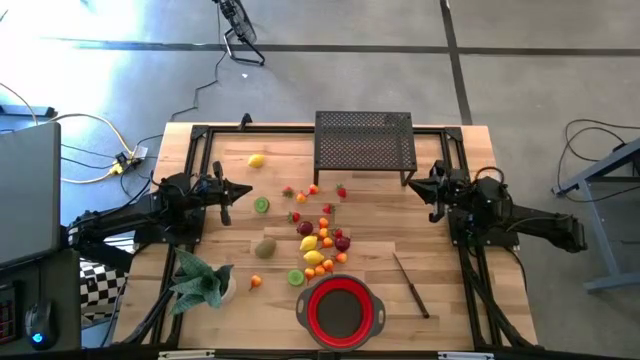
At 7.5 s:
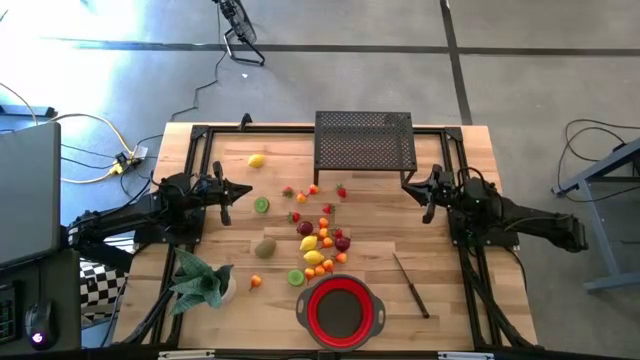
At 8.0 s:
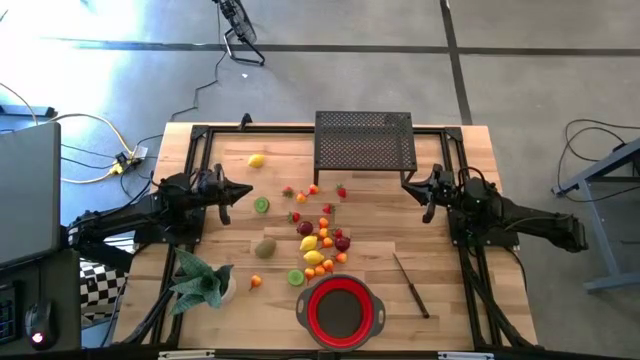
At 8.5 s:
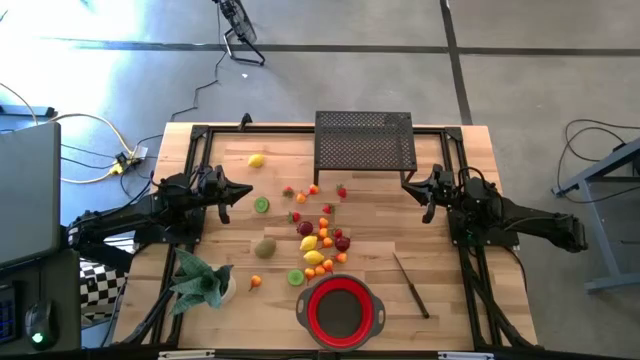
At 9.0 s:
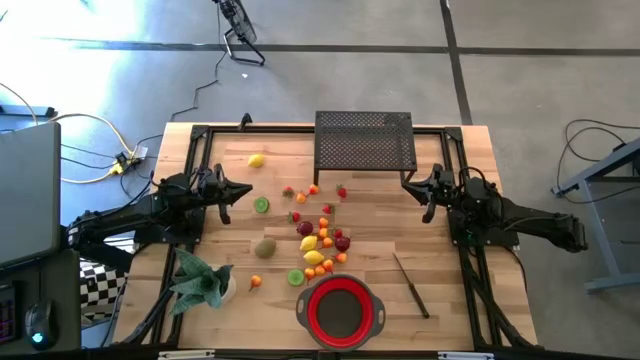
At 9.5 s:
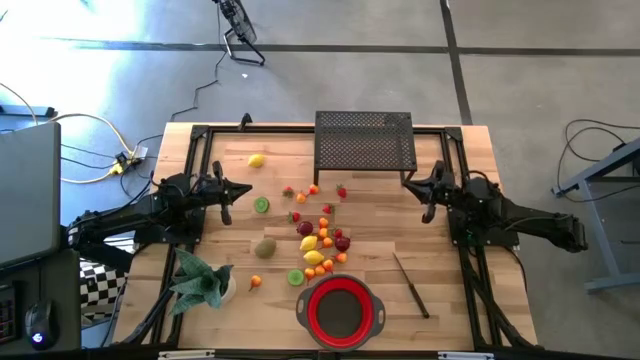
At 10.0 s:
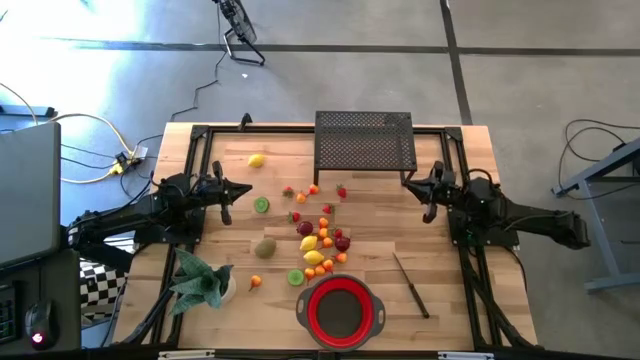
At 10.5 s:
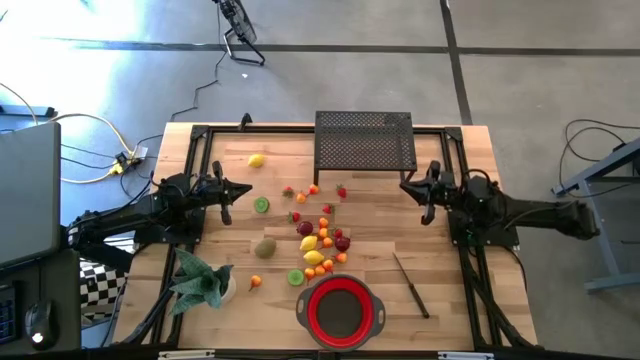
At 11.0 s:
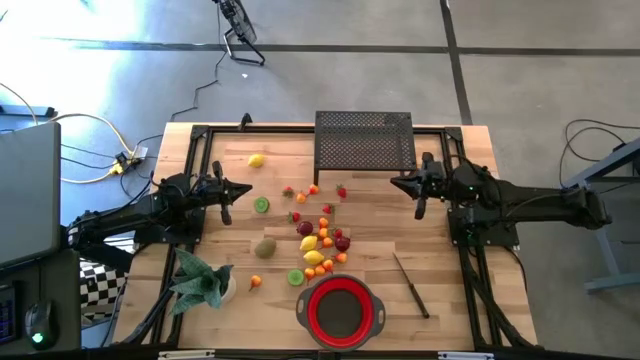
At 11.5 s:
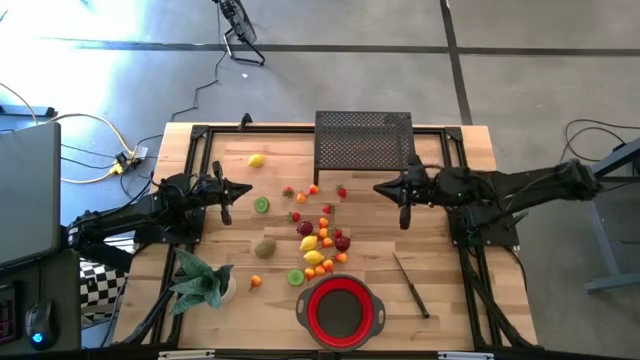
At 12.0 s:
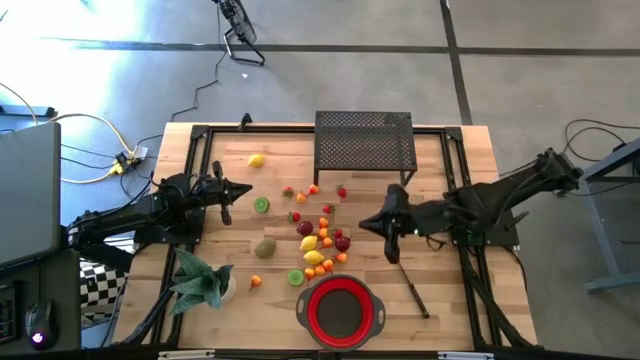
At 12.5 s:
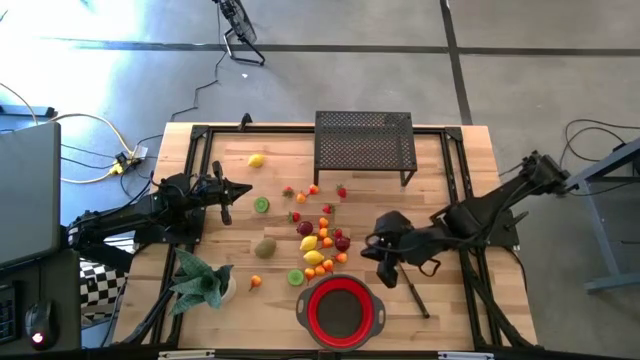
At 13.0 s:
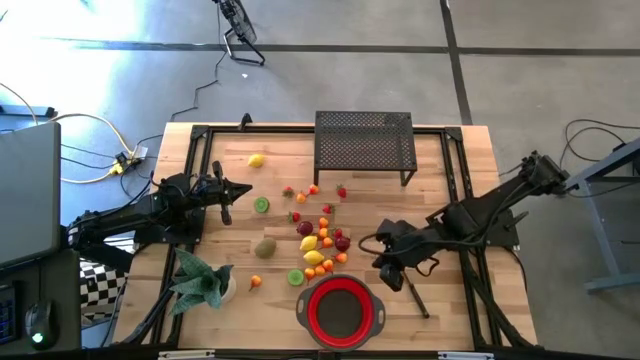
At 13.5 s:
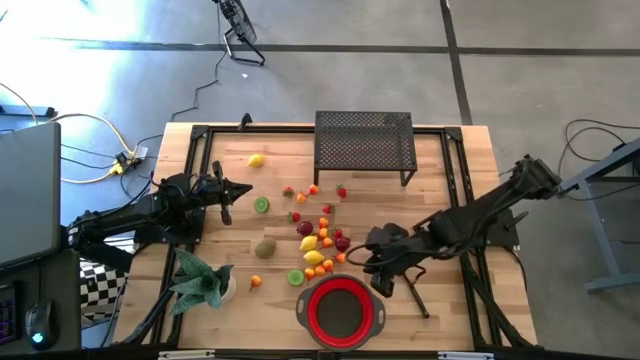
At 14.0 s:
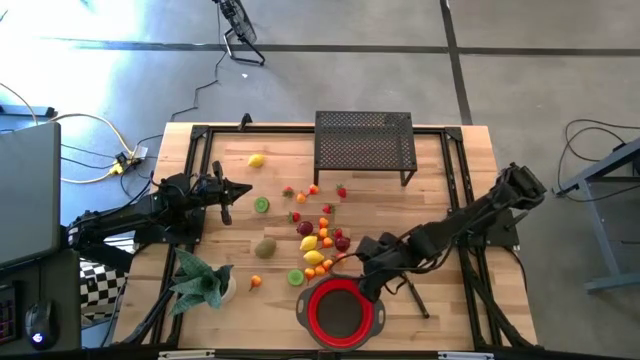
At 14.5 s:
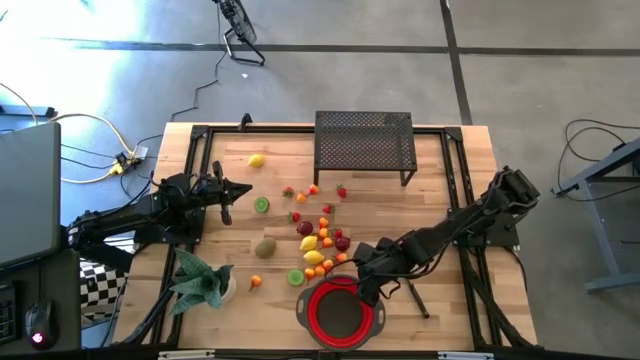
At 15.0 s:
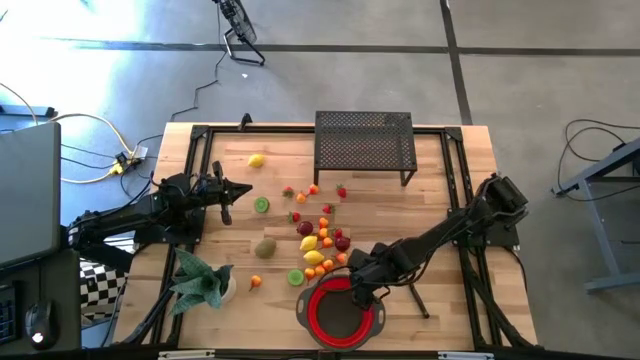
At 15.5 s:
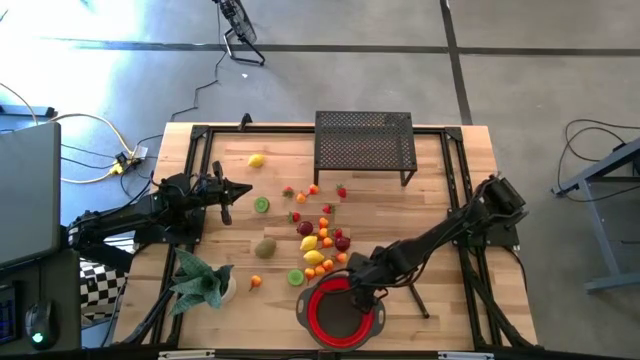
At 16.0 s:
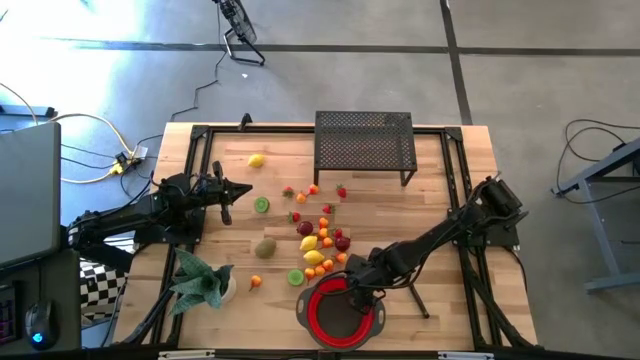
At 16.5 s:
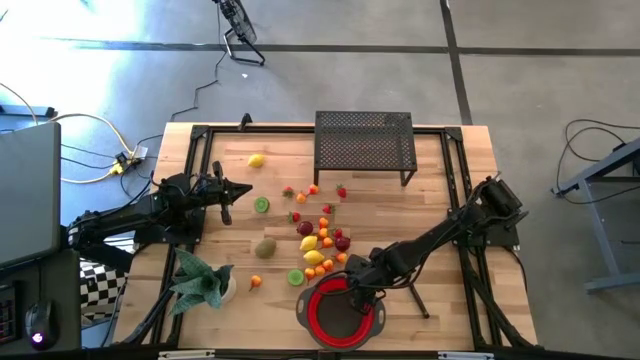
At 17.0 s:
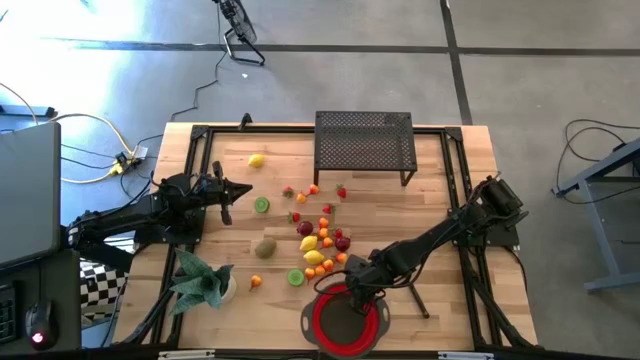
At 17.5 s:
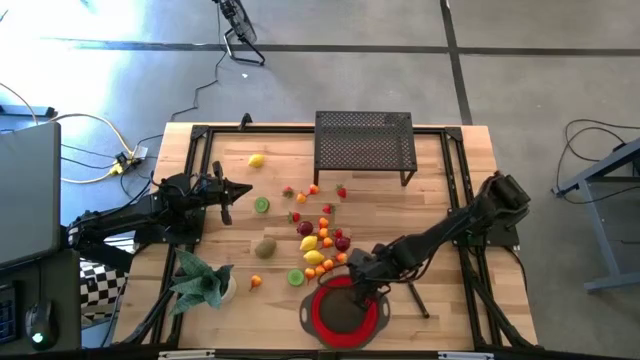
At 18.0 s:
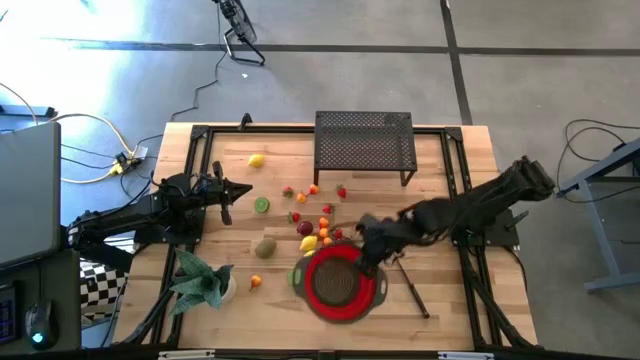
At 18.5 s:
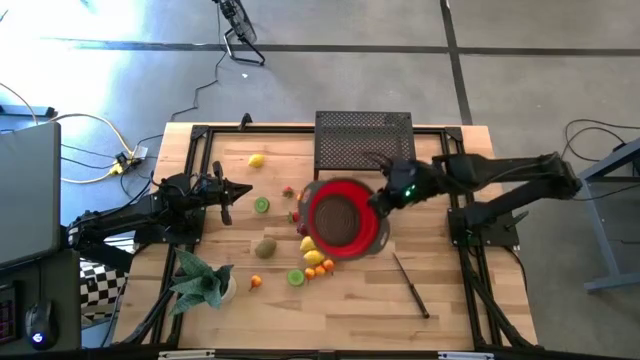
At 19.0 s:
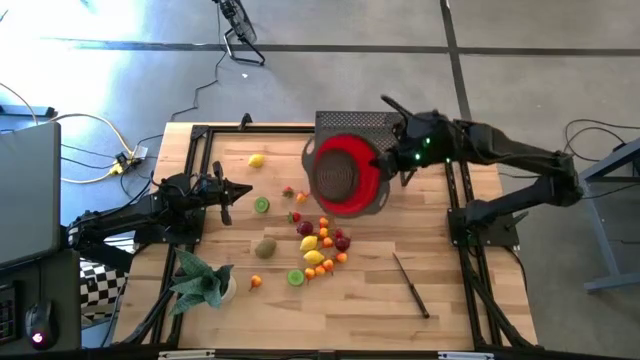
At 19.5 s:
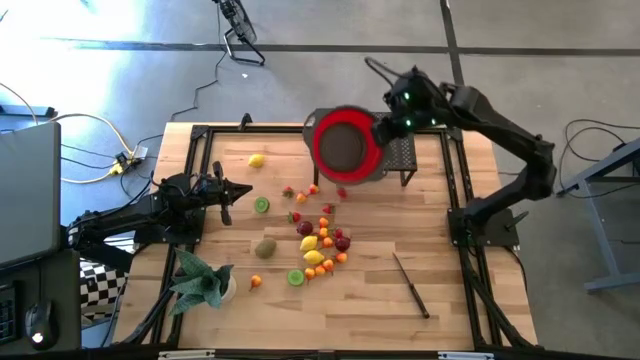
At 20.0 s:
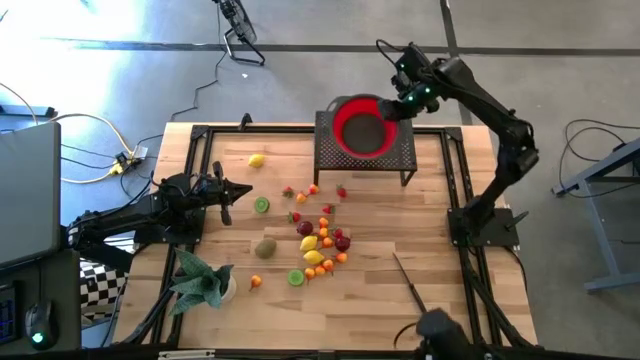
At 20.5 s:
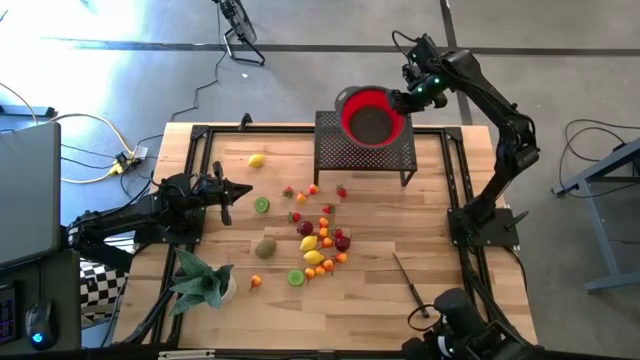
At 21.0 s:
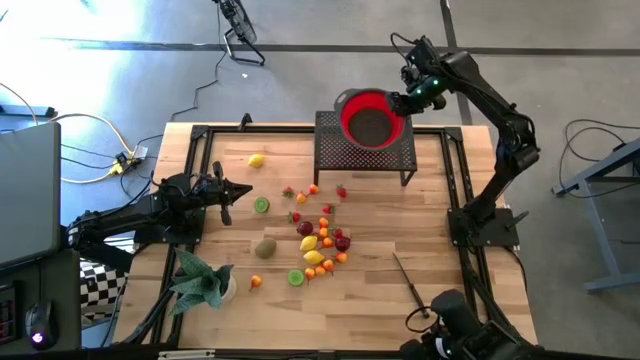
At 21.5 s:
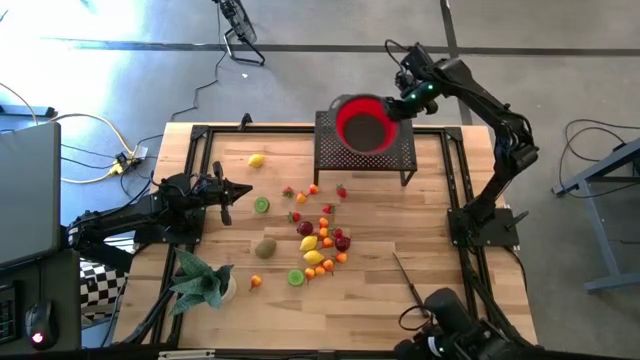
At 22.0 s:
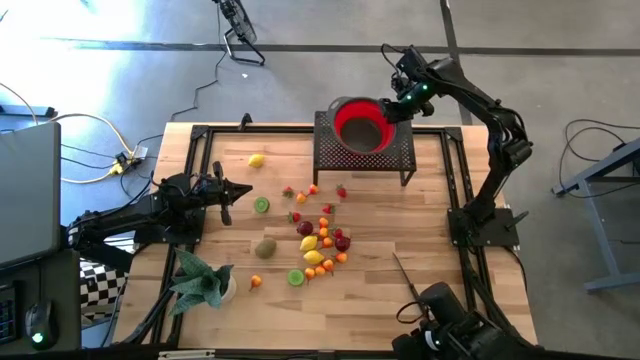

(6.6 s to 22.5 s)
Task: Pick & Place Fruit
Put the strainer on the shelf

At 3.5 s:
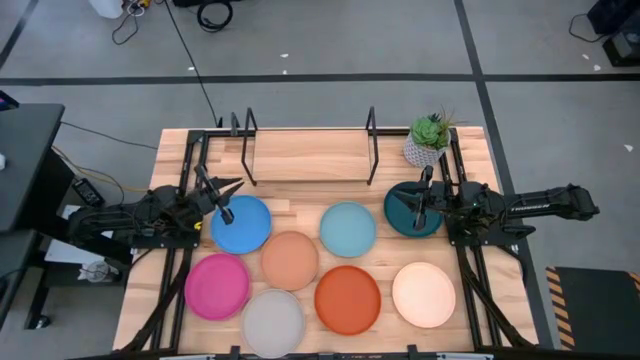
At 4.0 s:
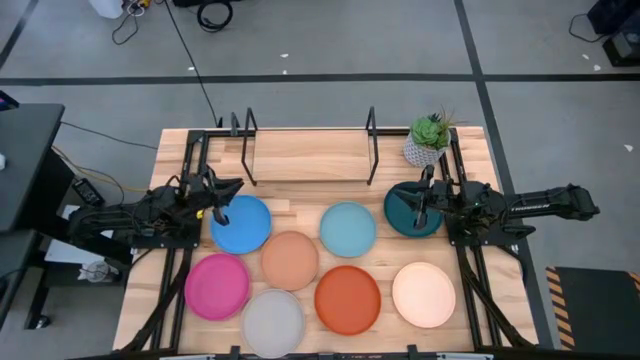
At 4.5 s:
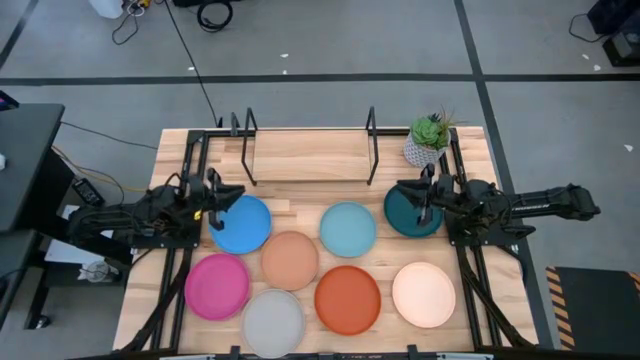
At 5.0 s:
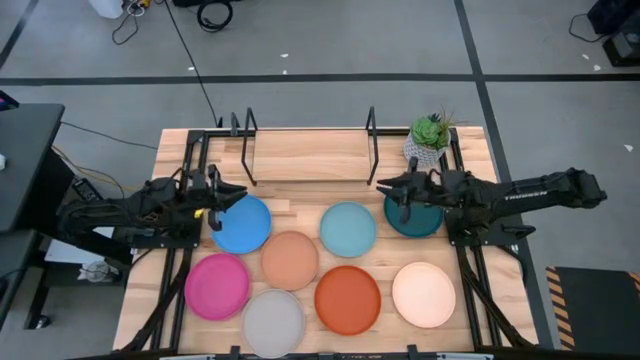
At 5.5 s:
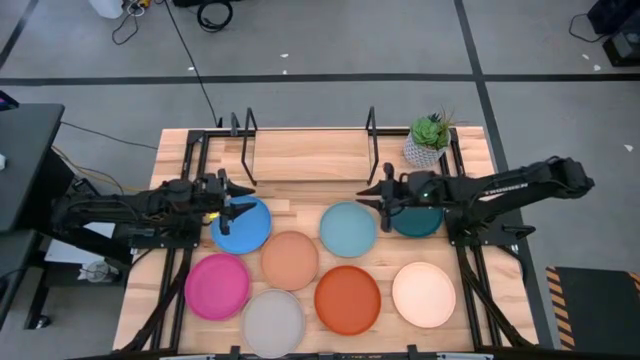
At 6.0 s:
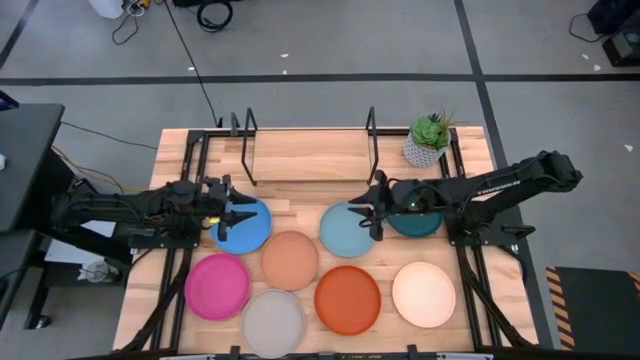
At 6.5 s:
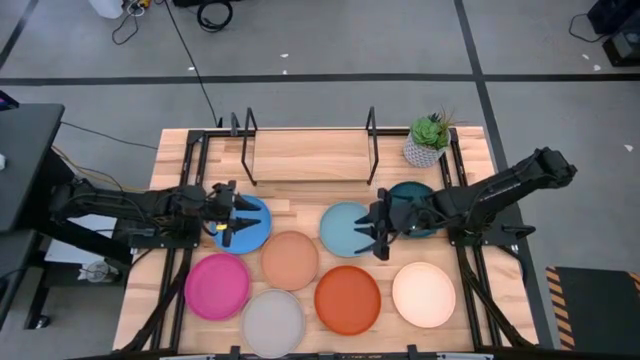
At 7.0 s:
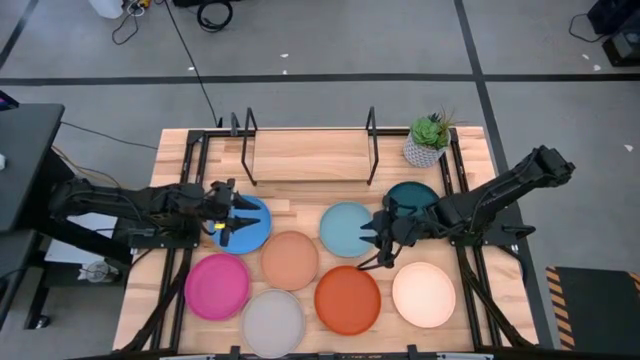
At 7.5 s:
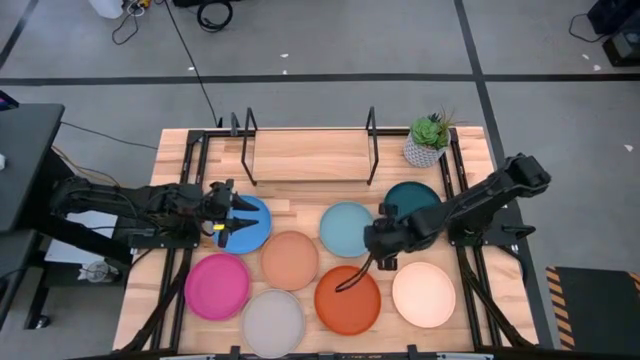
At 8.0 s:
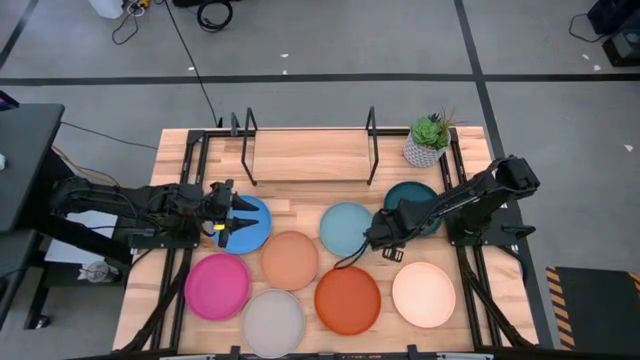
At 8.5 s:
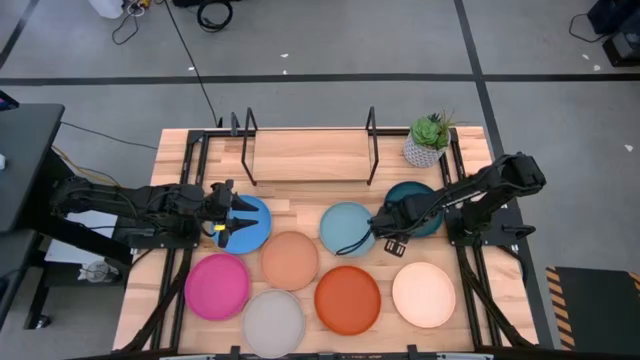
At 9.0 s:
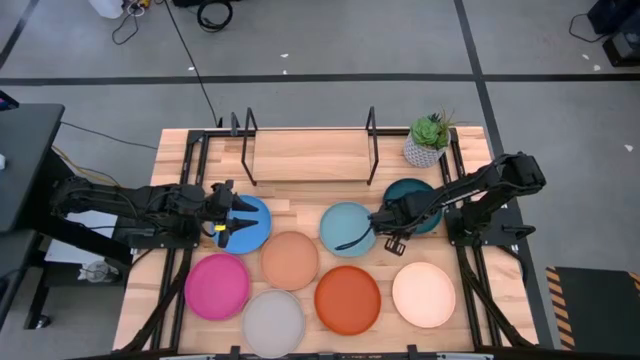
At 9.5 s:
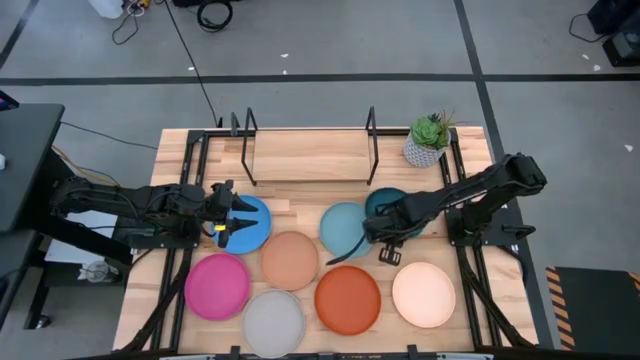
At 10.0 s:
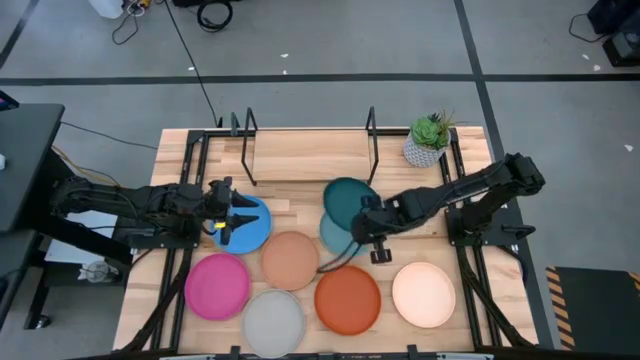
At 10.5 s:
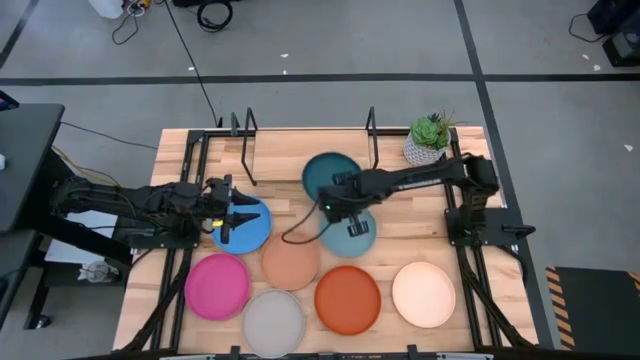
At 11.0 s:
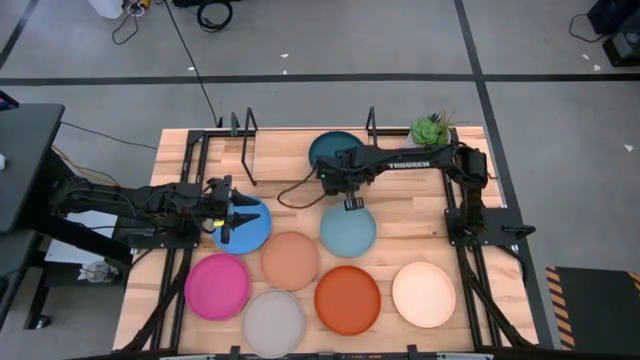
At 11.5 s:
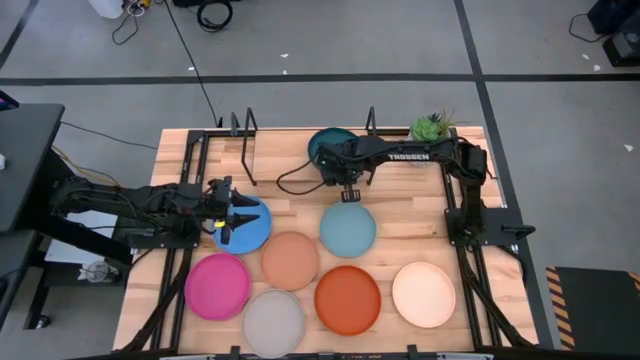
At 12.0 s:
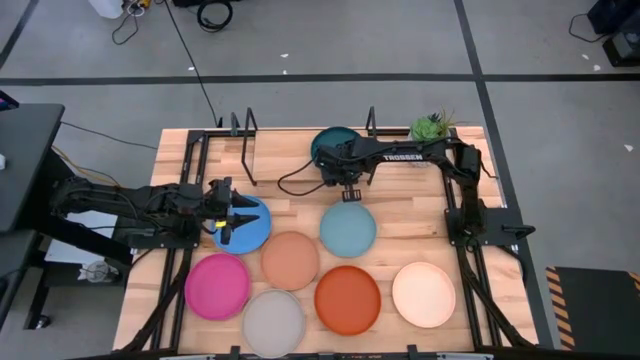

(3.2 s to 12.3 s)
Task: Place and stack plates onto a shelf
Put the dark blue plate on the shelf
